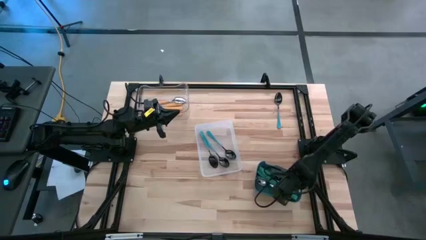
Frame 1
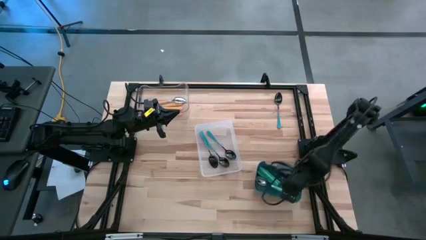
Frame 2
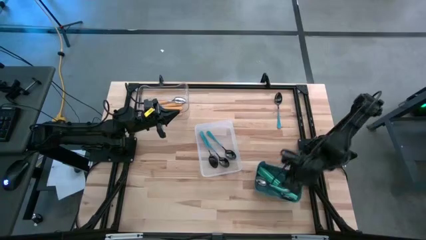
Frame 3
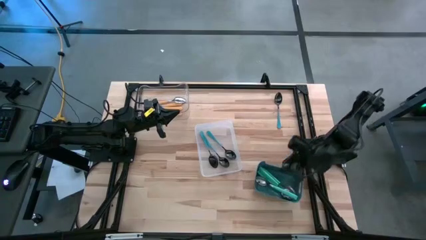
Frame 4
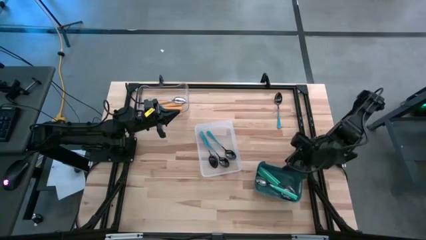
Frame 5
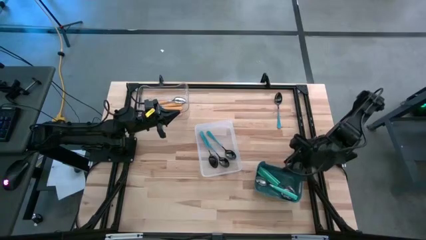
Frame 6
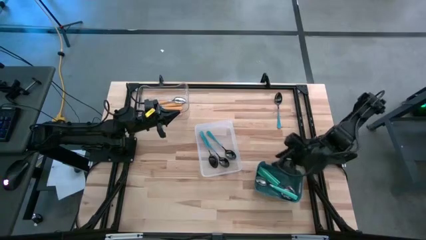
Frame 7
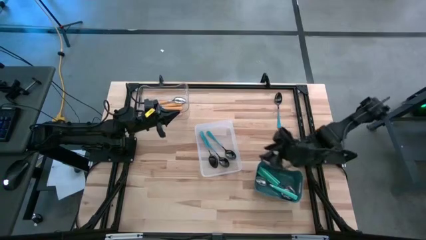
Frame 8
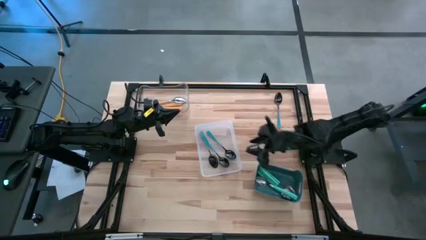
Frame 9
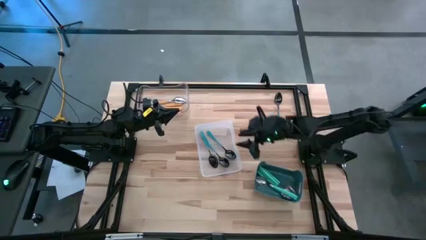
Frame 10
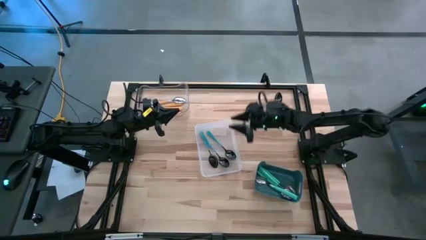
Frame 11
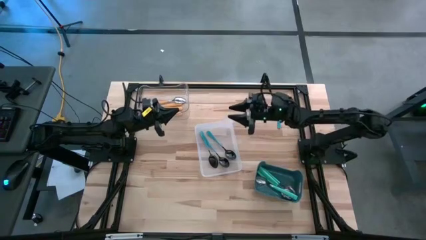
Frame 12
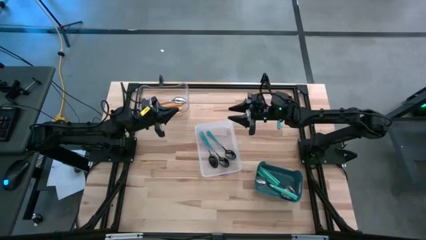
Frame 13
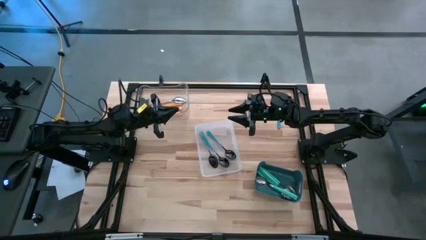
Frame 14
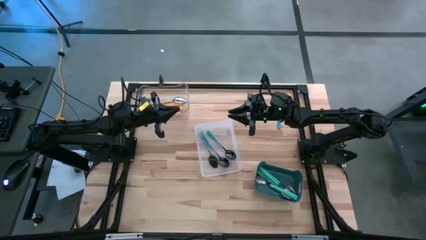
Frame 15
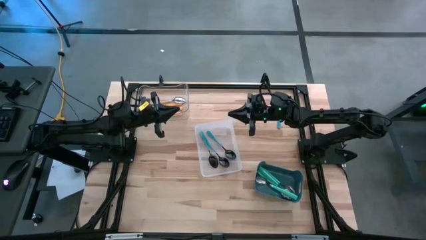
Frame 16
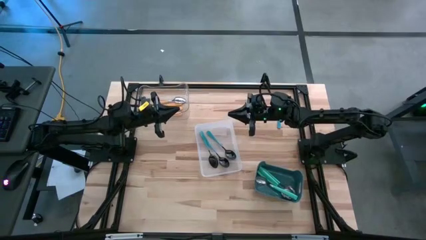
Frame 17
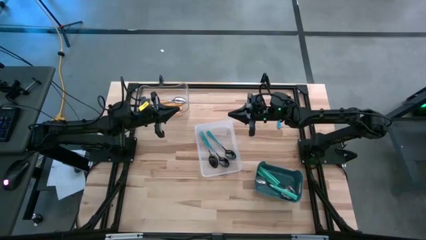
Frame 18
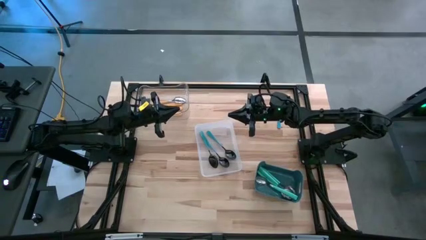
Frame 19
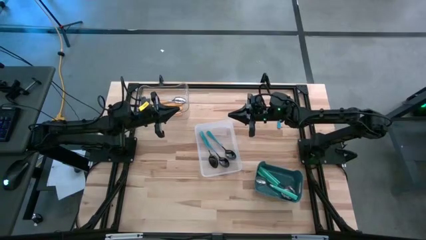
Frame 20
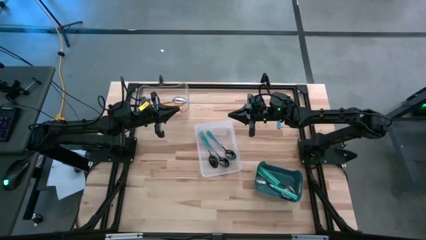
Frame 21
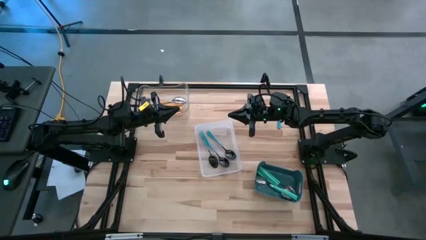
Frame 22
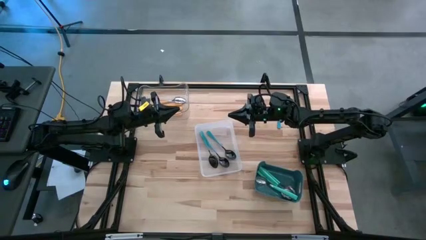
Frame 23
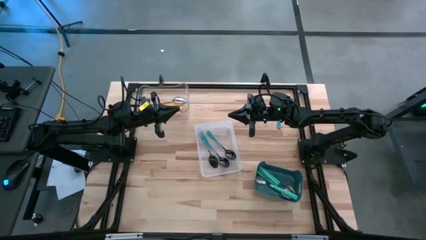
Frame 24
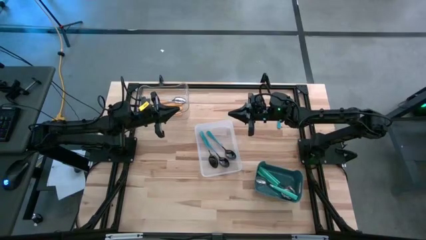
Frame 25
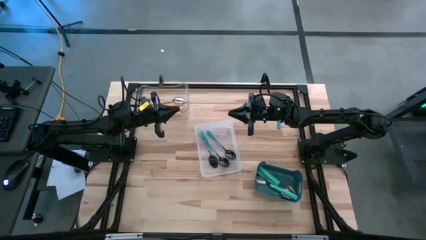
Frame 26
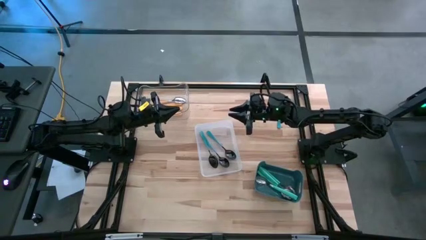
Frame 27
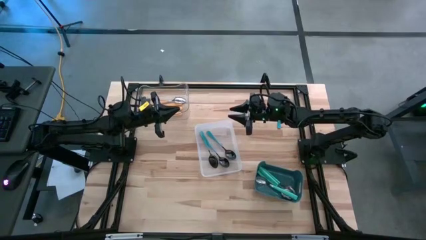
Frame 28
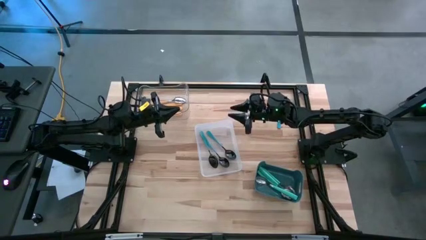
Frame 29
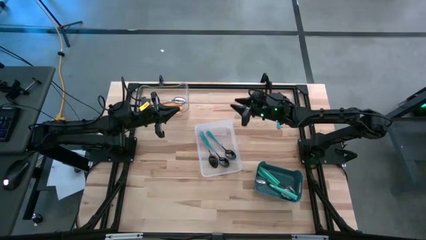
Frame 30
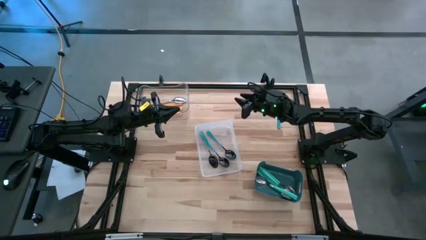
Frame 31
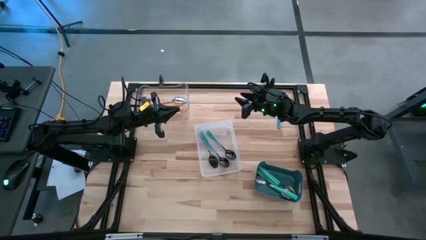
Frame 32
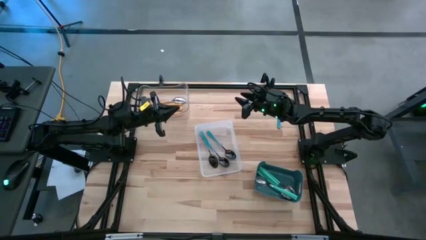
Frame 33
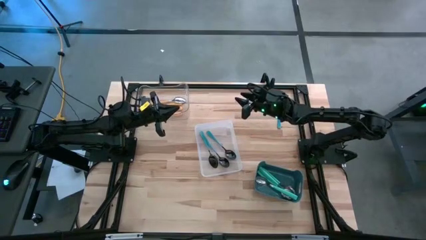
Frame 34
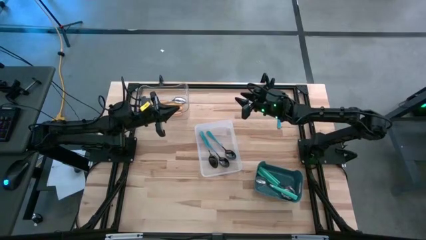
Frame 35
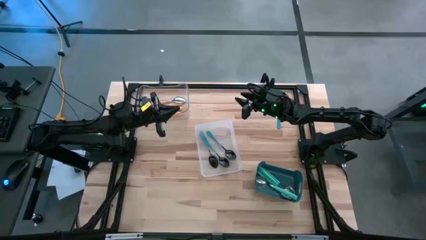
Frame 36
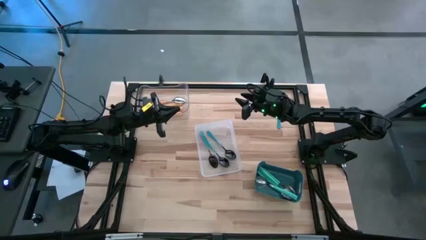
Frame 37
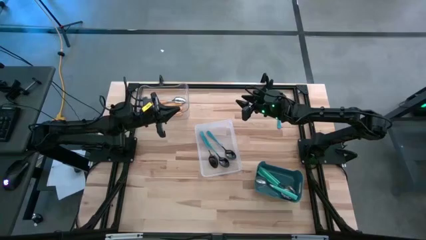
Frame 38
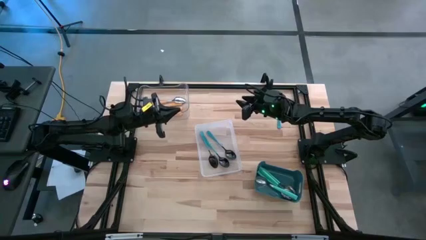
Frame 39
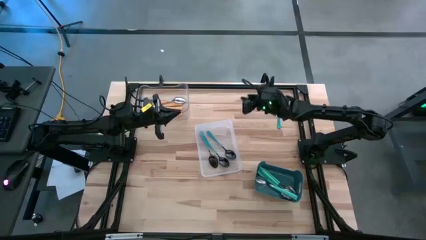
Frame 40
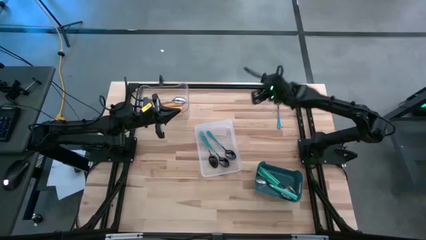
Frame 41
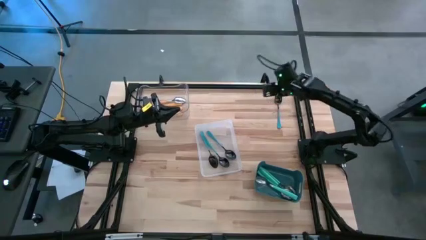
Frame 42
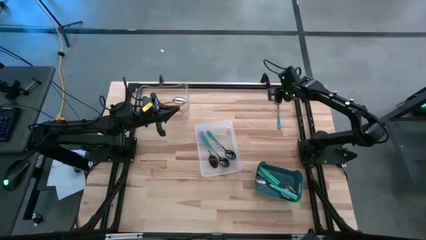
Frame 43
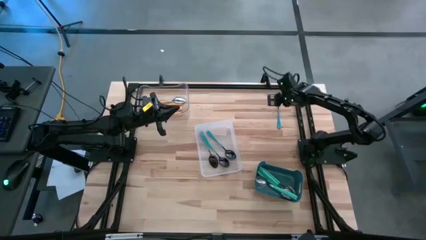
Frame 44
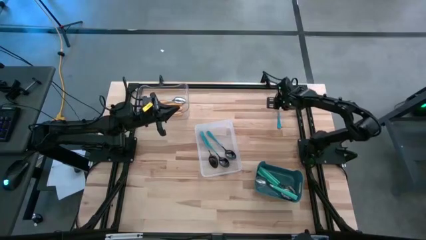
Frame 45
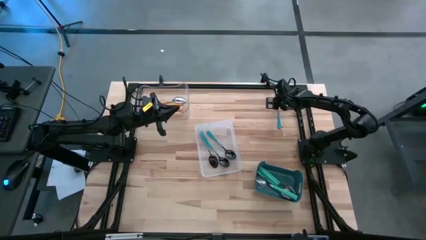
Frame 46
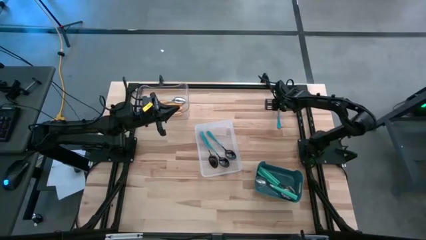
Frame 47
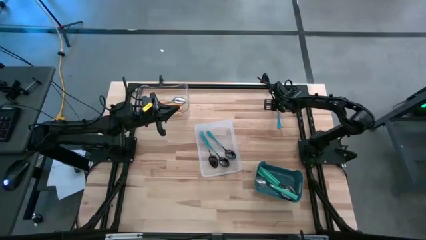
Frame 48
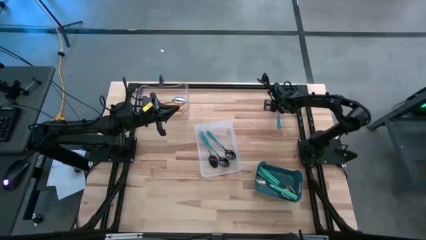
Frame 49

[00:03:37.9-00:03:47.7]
Task: Sort silverware by color (type)
Put the blue spoon into the white transparent bin

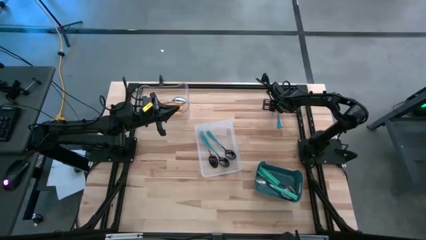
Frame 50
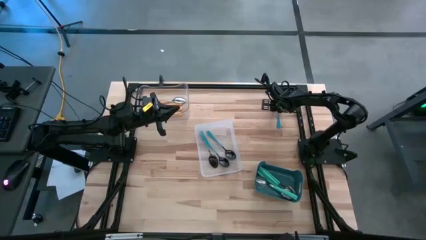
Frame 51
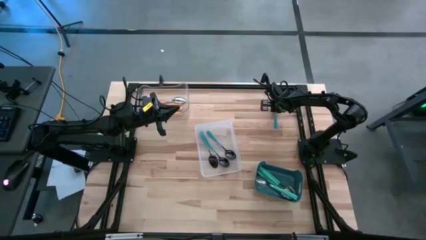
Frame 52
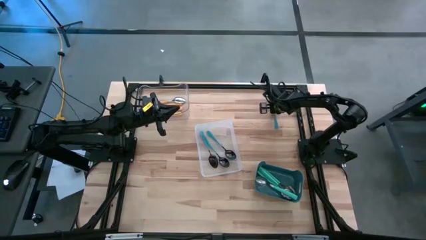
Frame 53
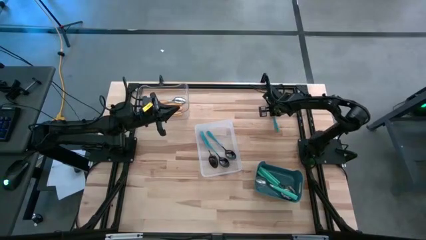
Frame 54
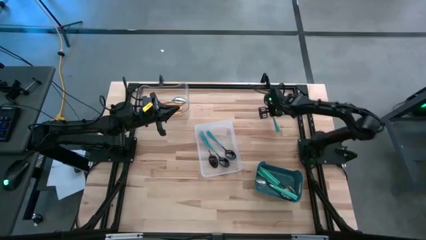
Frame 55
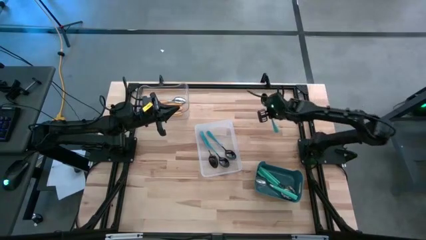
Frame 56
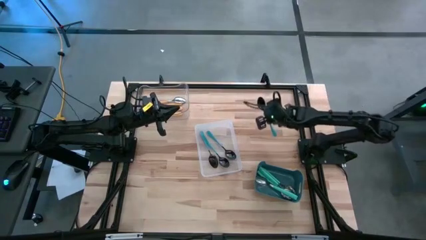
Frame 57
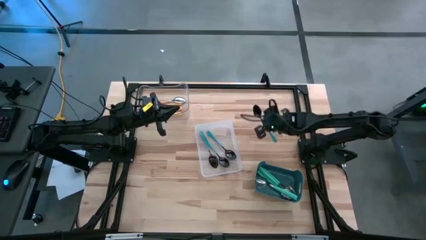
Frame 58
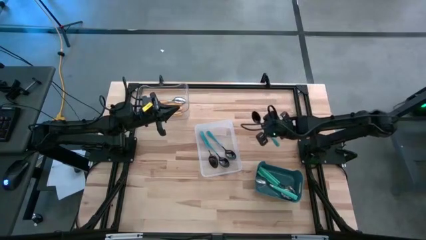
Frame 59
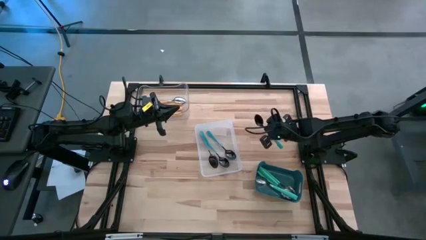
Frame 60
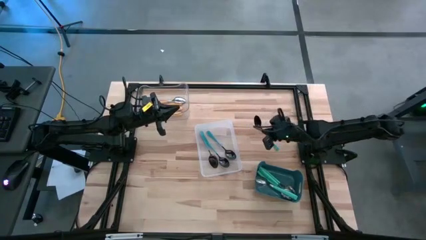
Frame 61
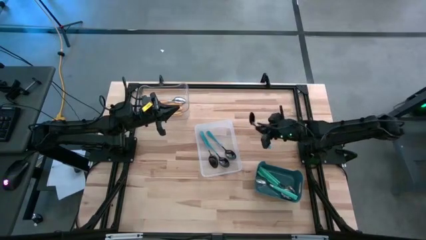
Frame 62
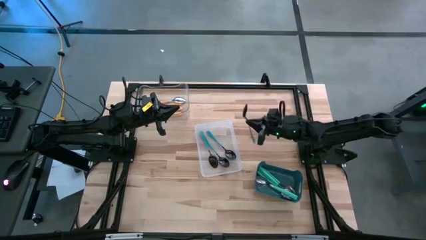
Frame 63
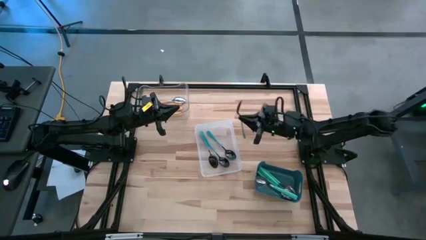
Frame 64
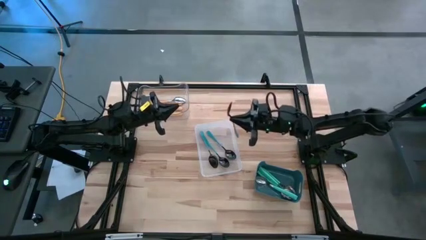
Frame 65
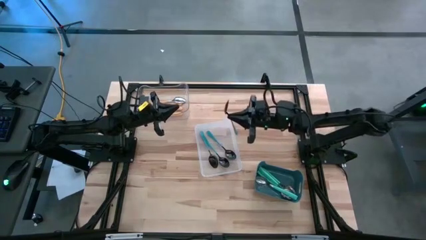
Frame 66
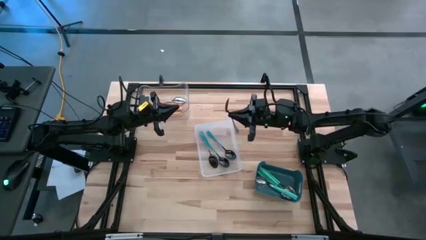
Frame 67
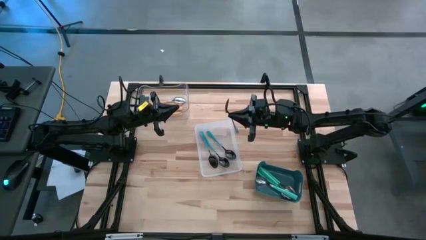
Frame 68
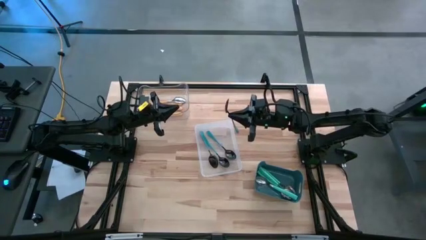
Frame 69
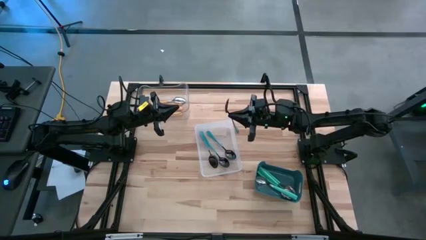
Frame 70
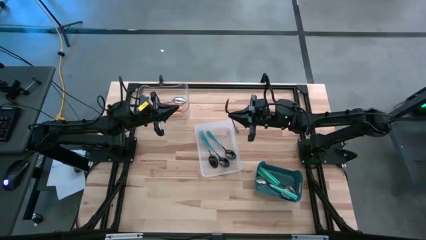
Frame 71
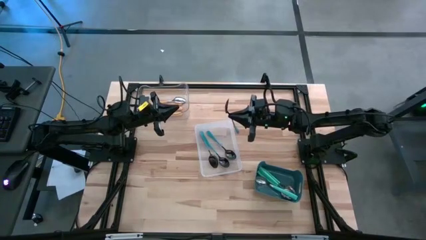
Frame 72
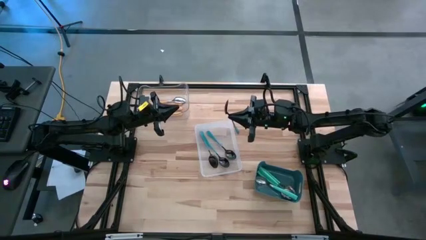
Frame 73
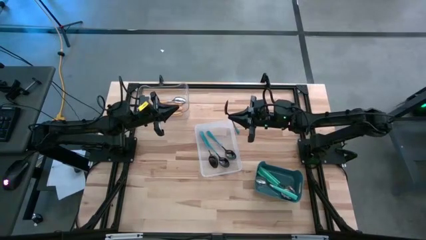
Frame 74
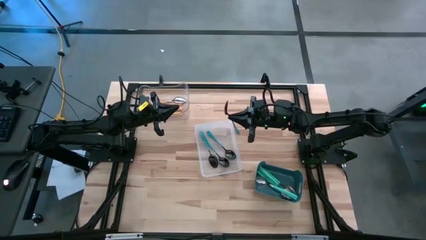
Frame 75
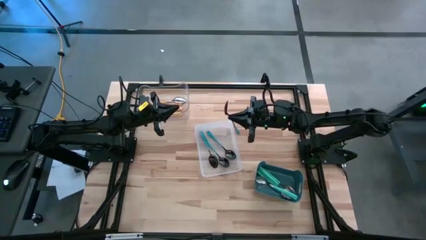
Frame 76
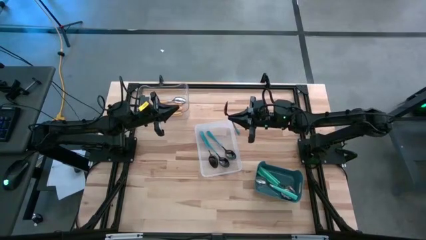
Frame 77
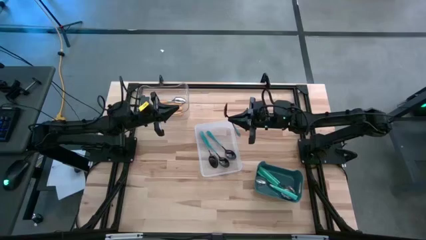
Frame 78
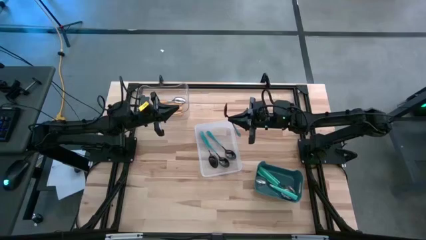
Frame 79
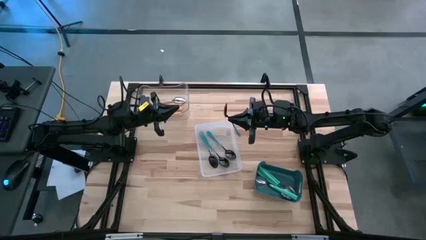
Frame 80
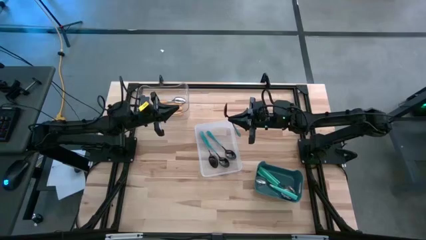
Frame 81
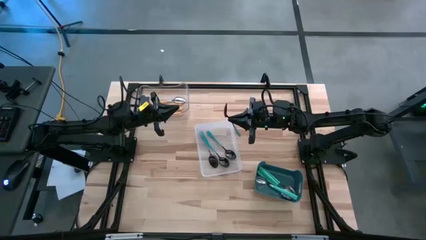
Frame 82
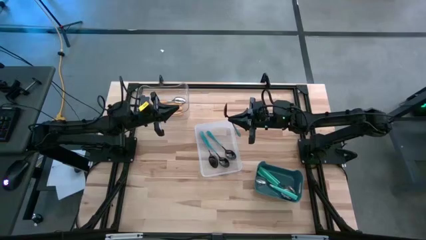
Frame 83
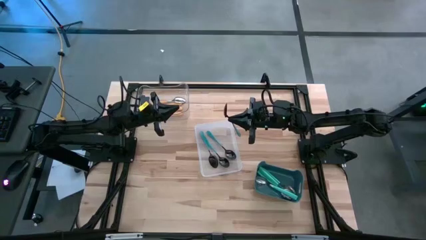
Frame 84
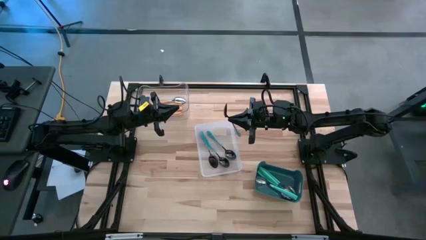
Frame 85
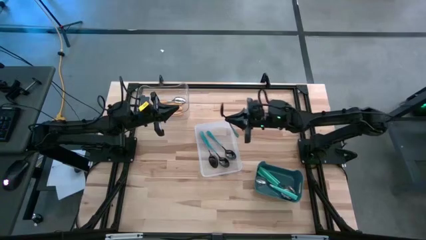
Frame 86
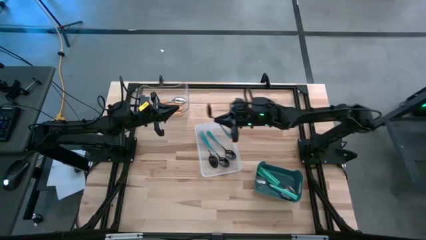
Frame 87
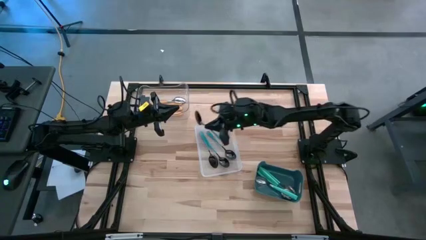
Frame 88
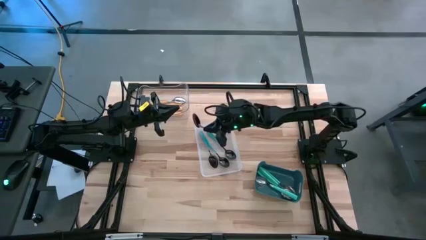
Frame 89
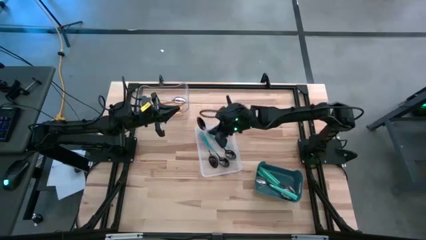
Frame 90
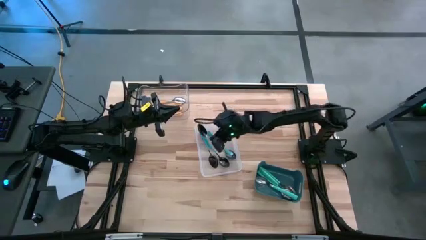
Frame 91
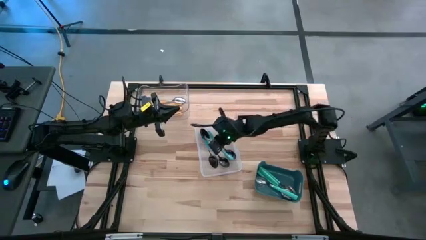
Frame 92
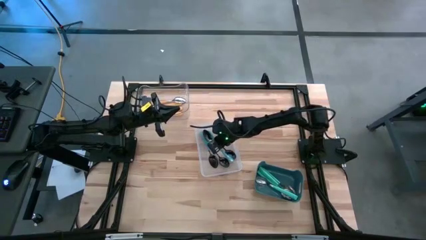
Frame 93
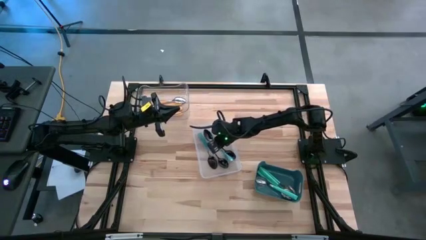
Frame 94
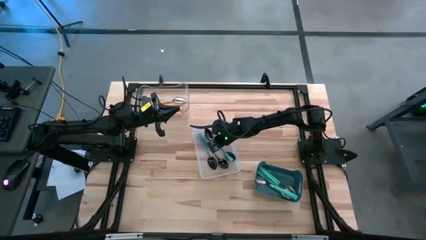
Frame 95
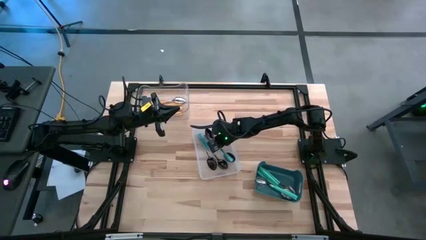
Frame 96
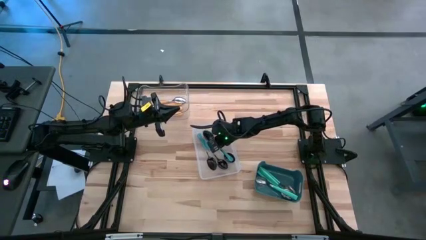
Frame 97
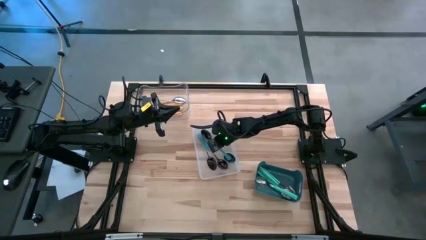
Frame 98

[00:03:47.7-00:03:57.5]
Put the blue spoon into the white transparent bin
